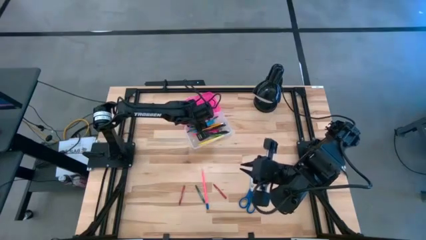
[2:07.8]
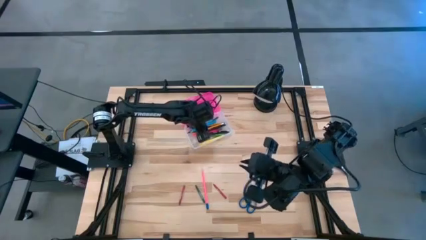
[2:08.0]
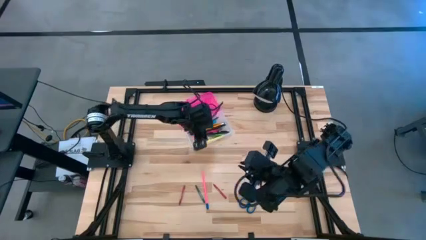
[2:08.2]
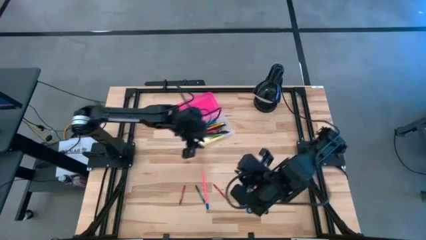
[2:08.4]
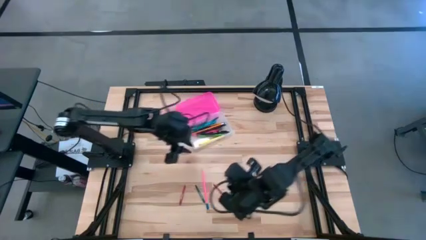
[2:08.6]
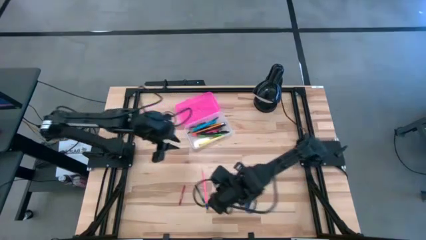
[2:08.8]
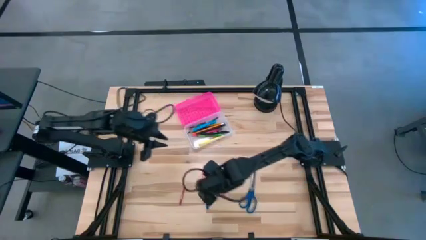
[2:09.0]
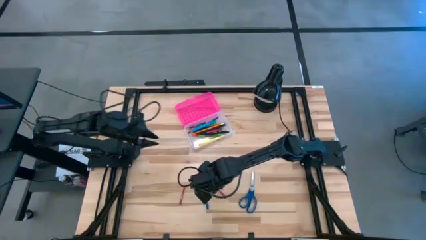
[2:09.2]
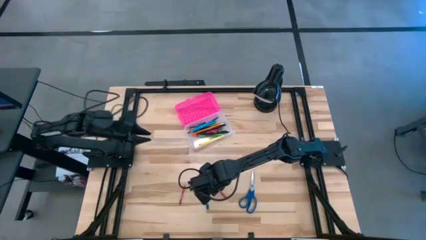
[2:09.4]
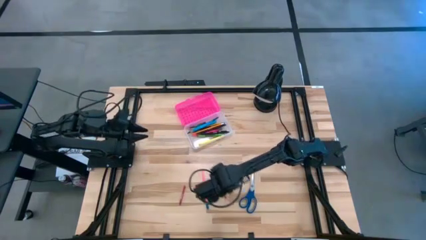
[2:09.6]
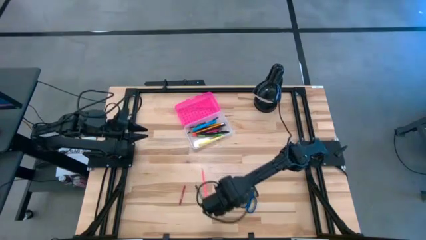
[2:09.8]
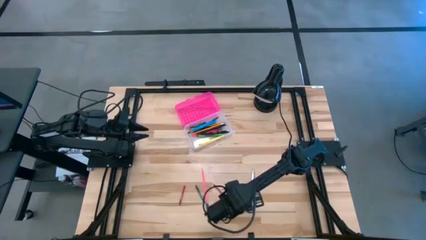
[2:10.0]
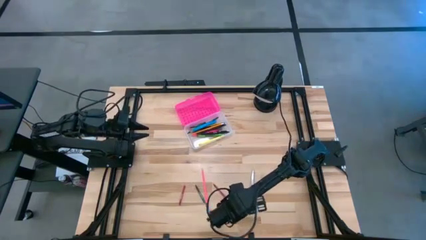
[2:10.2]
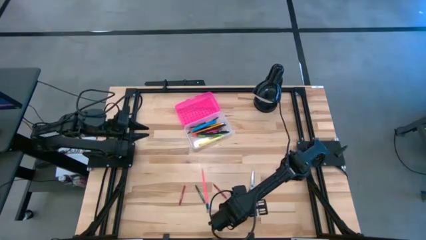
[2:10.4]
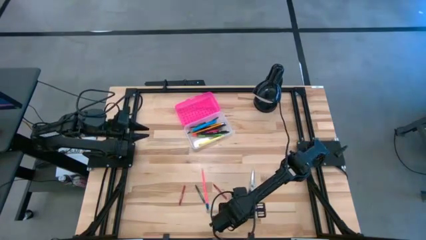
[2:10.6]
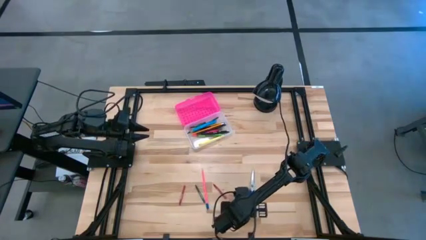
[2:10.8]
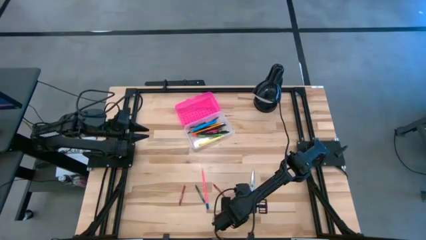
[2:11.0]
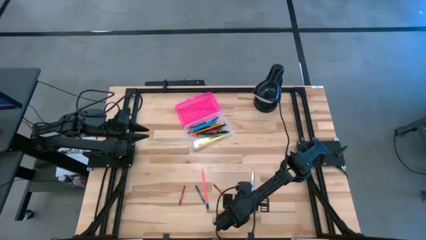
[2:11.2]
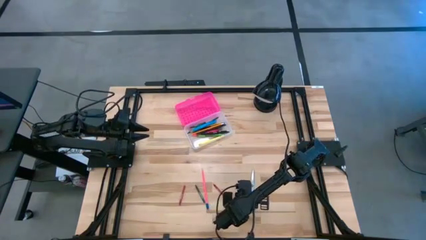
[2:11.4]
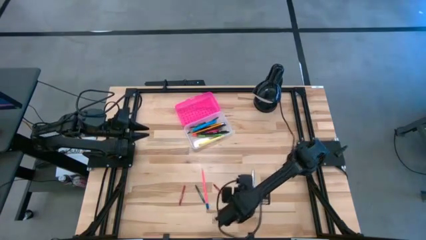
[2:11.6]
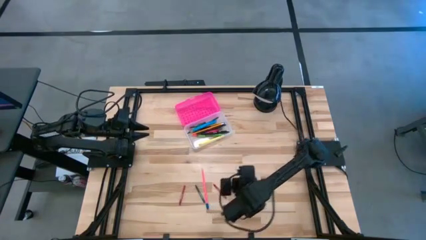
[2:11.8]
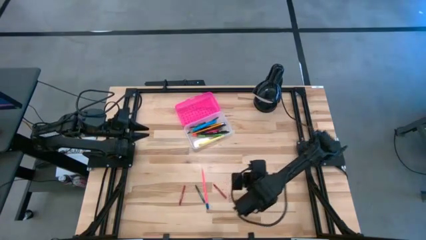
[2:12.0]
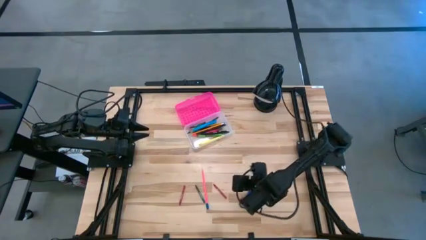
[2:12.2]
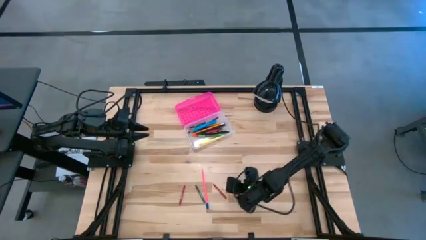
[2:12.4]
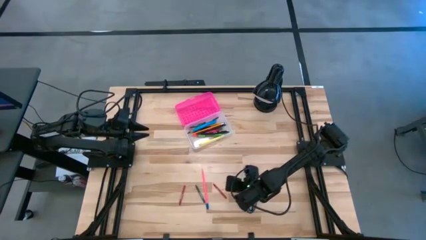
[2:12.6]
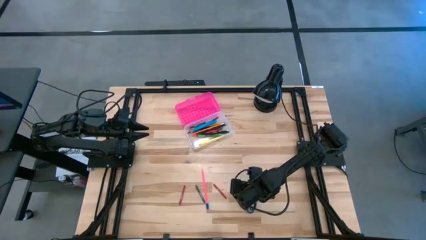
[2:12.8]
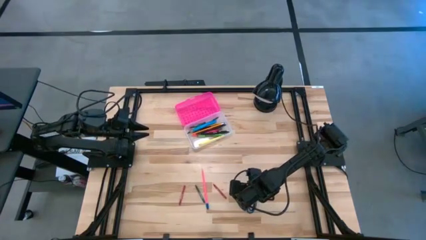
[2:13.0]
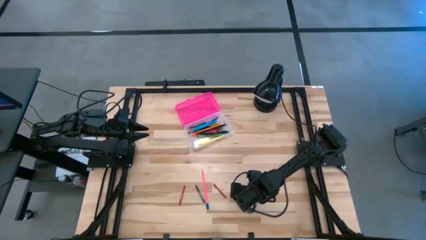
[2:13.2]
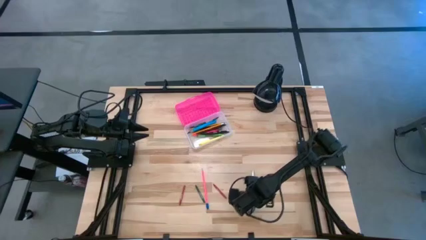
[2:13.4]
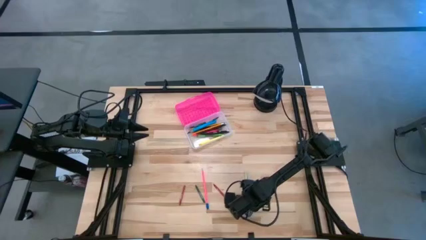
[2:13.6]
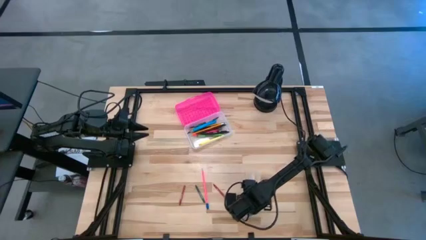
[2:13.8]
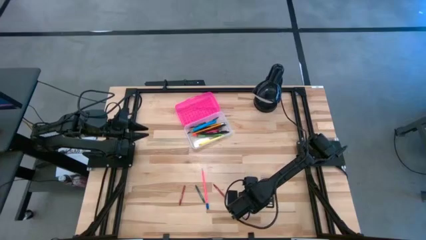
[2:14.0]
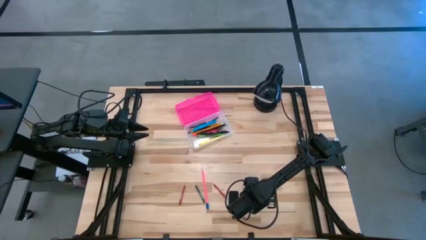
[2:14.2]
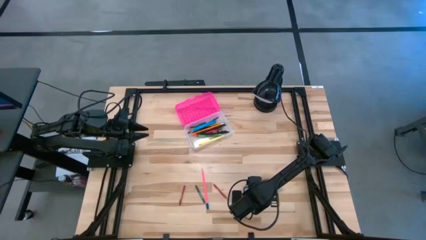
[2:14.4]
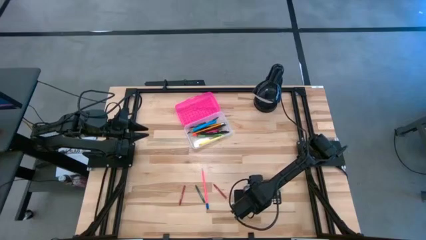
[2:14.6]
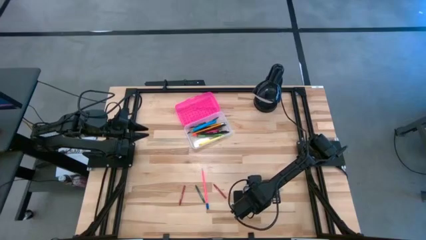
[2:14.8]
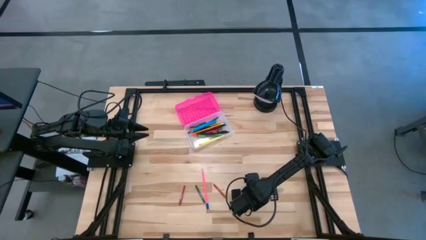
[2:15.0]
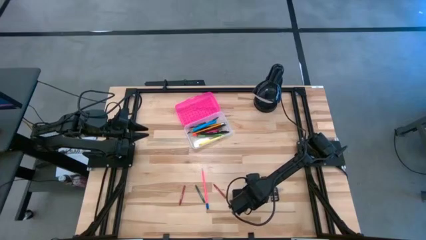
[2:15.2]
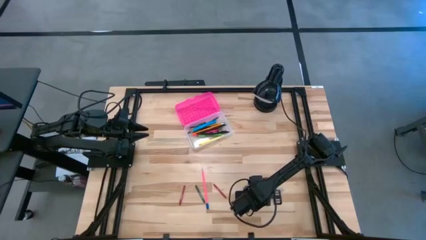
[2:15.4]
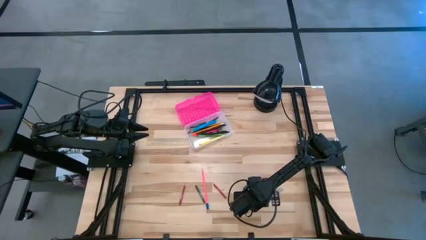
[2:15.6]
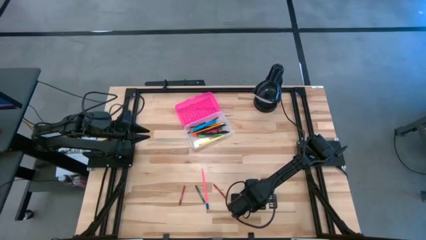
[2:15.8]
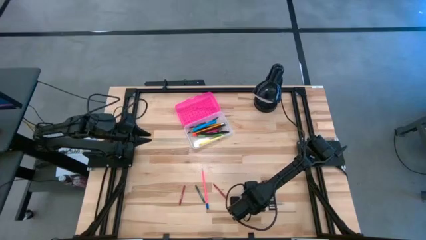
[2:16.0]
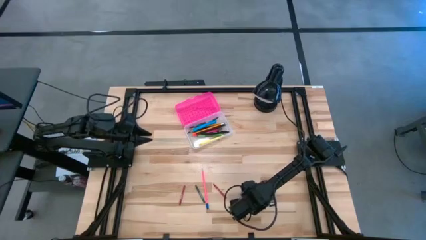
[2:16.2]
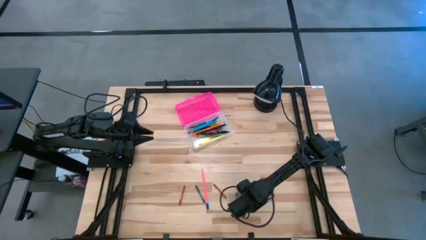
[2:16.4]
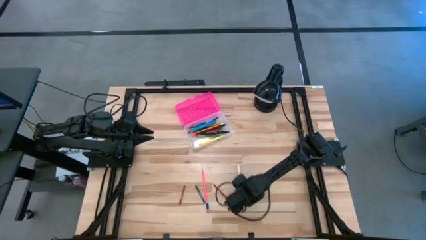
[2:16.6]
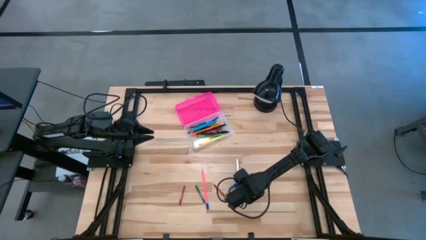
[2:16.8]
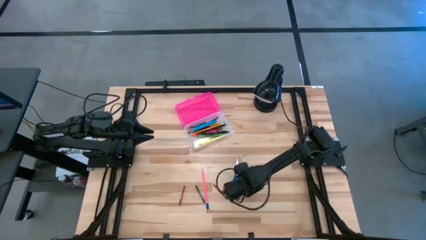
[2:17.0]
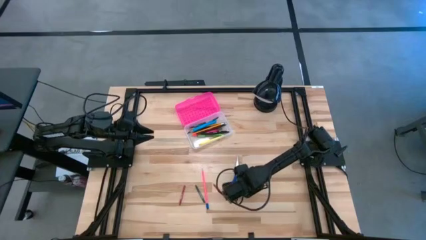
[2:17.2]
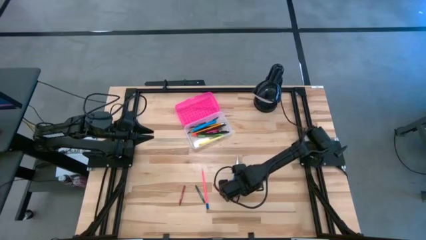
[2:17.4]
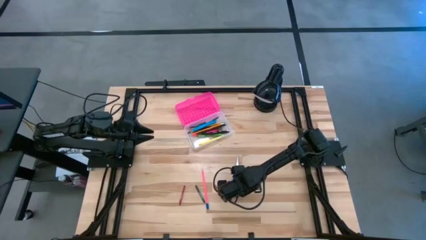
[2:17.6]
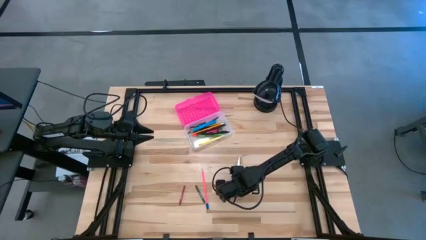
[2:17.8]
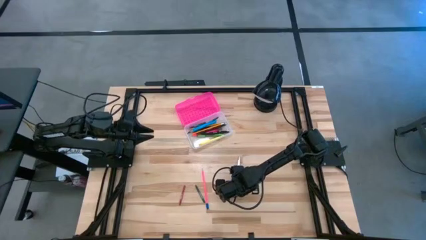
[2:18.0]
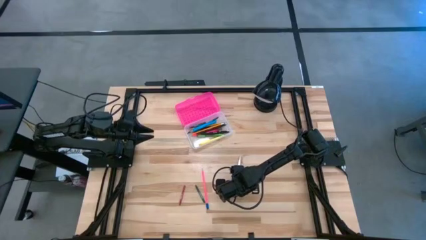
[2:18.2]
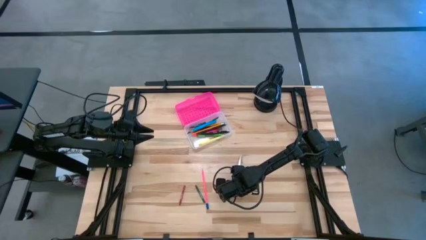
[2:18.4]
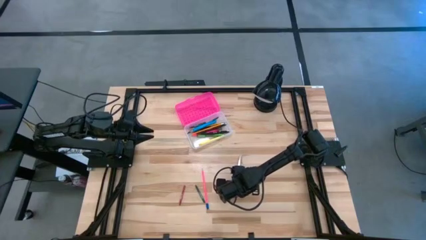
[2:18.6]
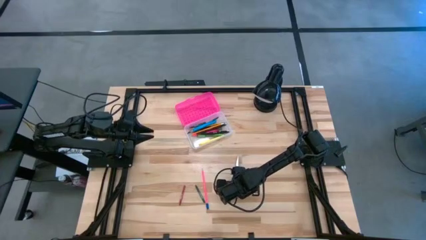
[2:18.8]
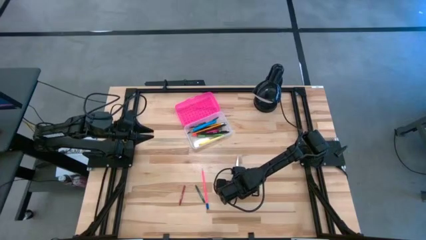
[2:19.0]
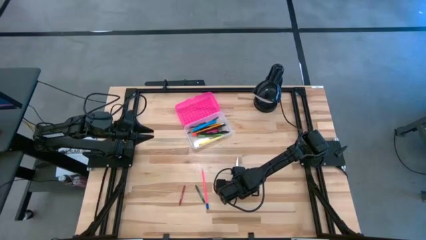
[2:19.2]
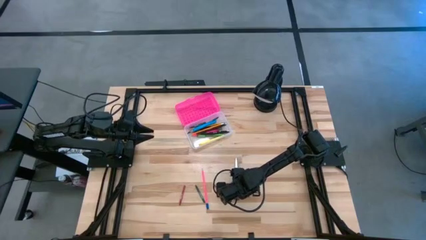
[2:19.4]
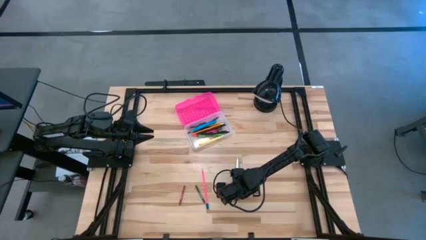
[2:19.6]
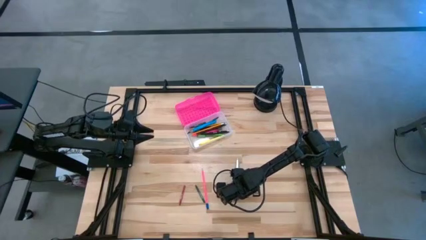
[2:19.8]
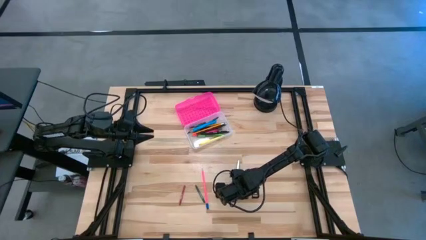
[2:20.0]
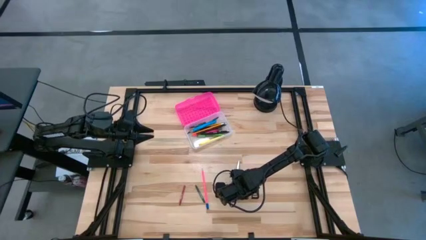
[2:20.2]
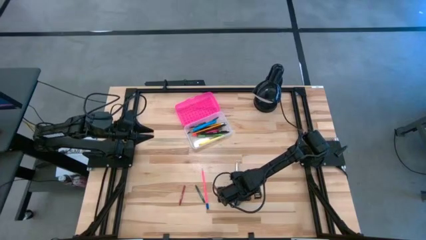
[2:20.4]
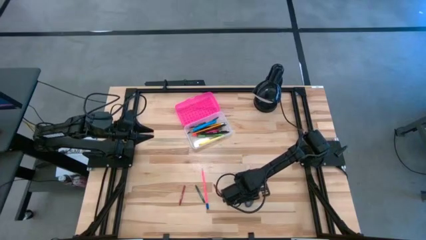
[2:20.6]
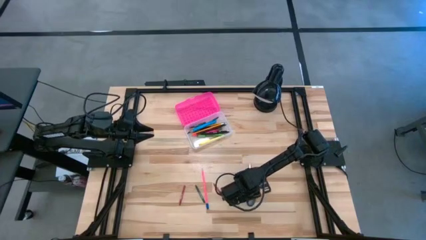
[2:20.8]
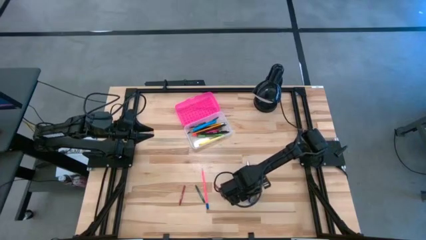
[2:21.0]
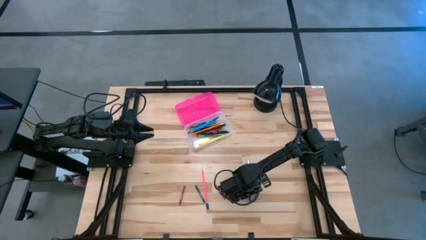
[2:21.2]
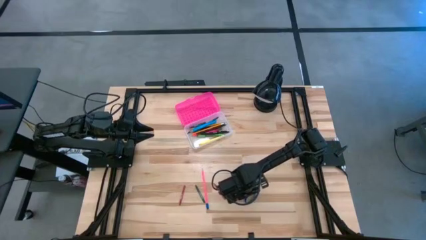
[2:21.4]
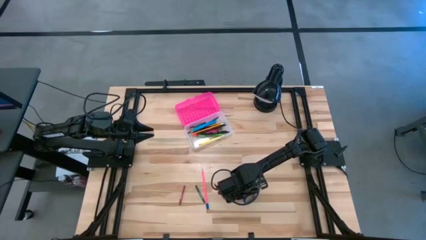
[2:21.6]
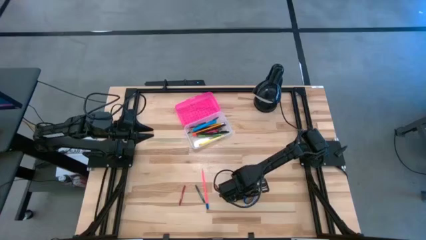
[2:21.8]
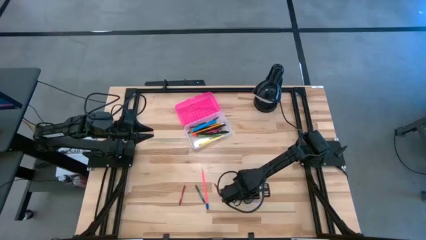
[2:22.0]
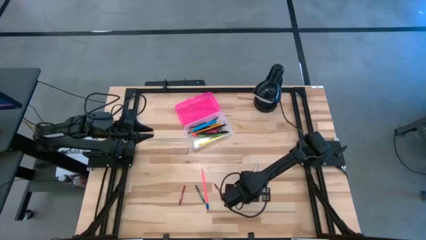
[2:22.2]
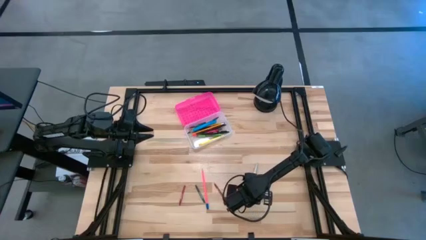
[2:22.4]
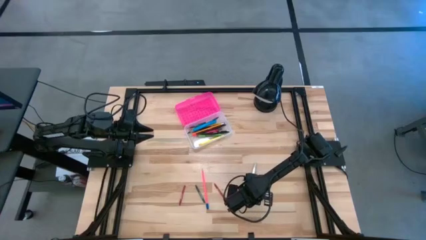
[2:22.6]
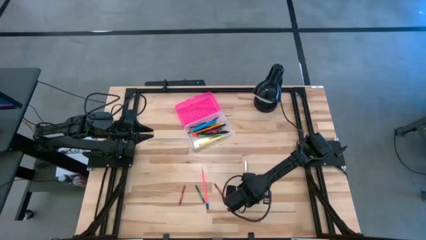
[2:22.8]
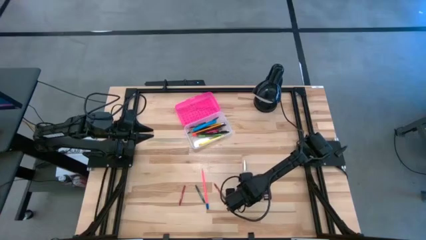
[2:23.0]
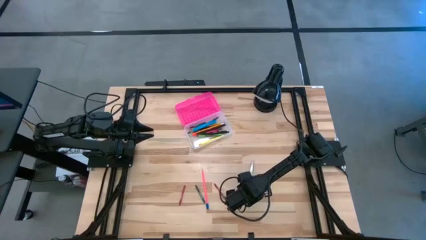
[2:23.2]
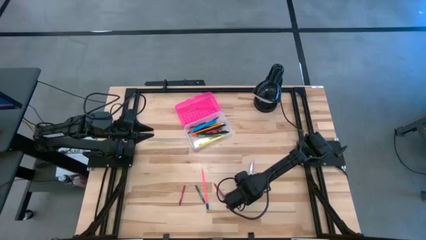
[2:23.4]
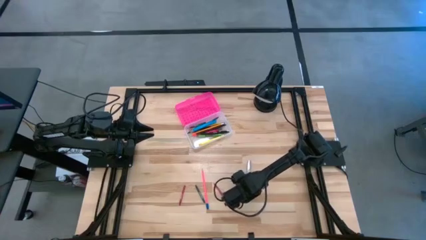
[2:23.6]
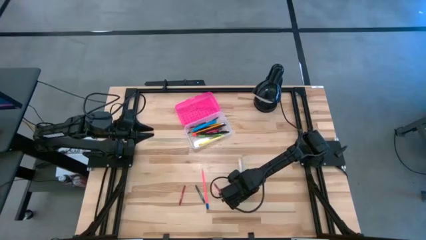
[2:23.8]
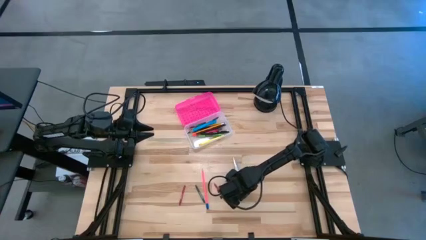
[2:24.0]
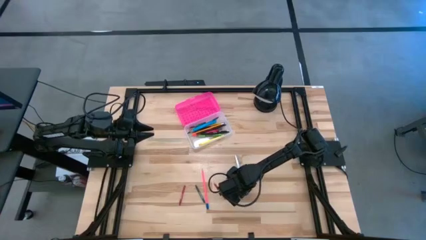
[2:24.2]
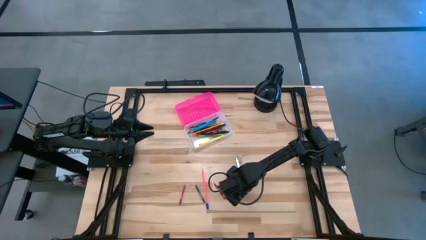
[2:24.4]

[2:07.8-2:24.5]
Task: Pick & place school supplies into a supply box
Put the blue scissors into the pink supply box
